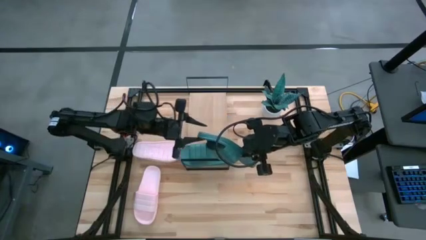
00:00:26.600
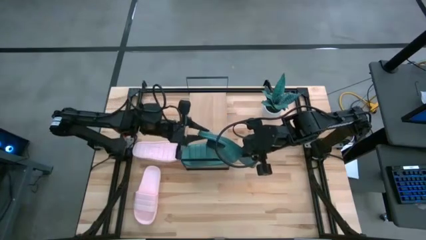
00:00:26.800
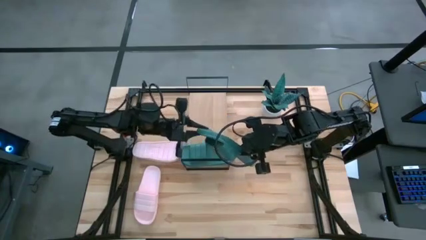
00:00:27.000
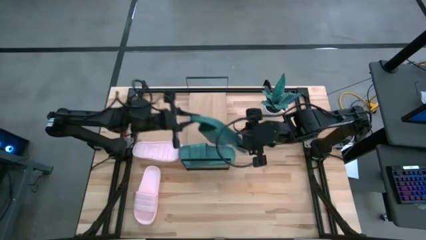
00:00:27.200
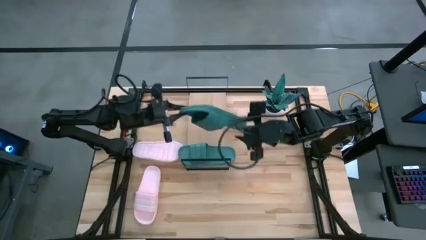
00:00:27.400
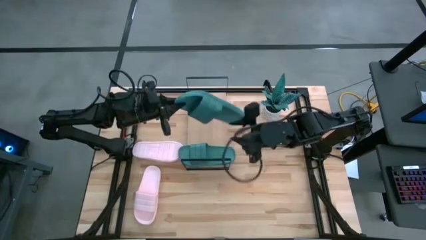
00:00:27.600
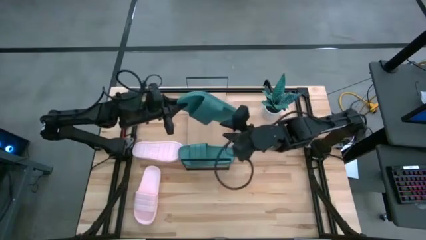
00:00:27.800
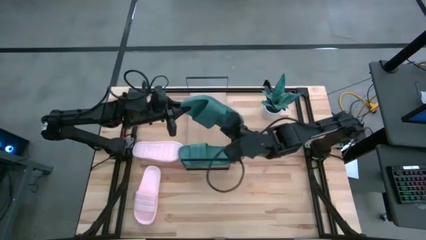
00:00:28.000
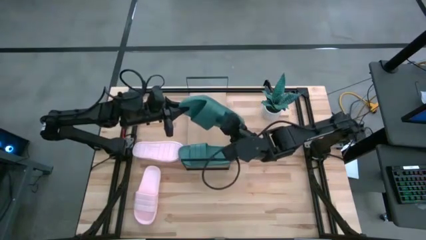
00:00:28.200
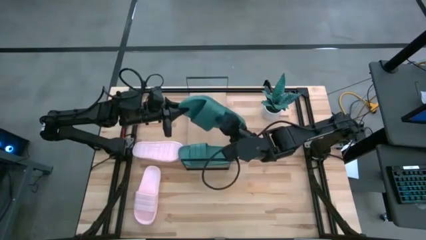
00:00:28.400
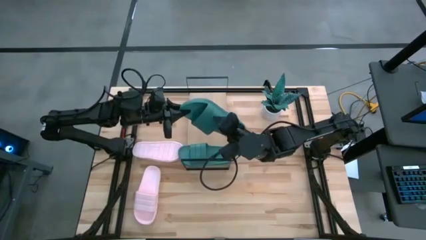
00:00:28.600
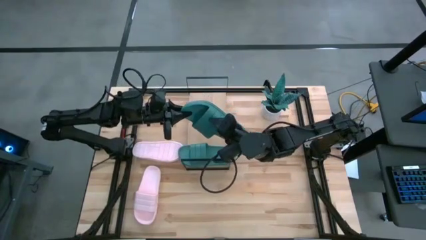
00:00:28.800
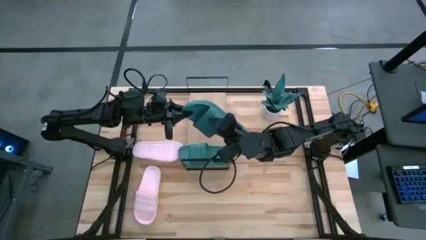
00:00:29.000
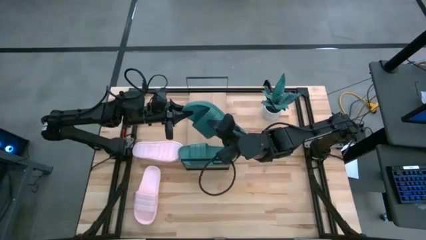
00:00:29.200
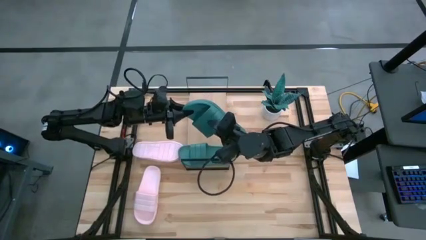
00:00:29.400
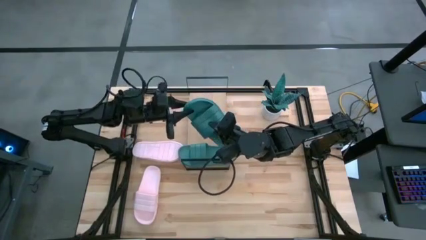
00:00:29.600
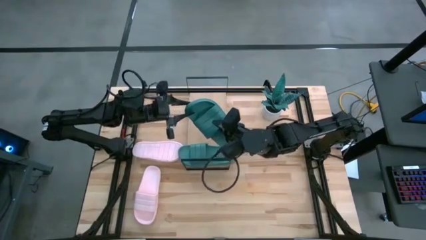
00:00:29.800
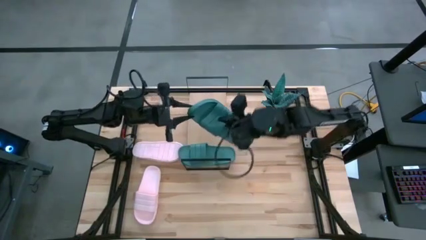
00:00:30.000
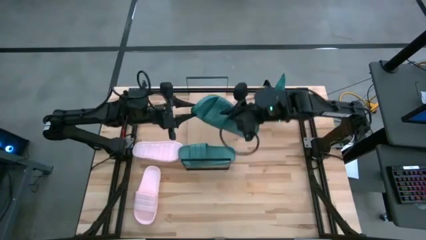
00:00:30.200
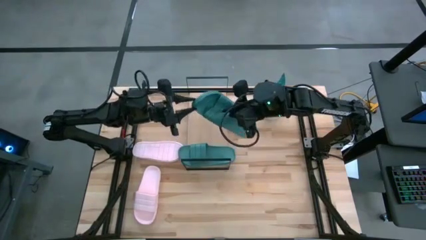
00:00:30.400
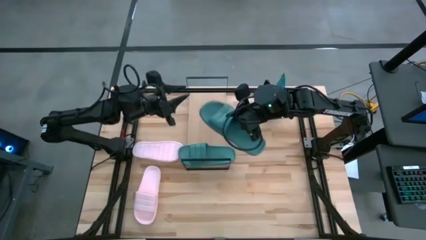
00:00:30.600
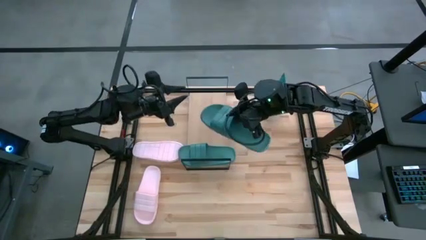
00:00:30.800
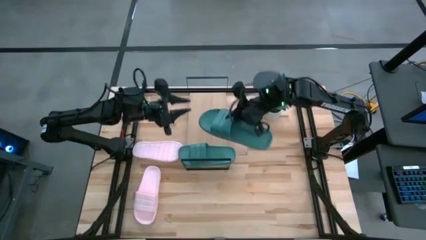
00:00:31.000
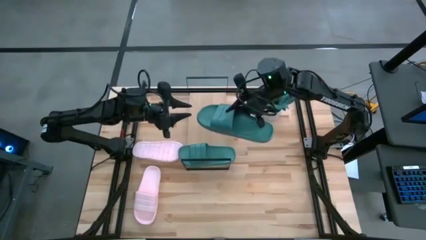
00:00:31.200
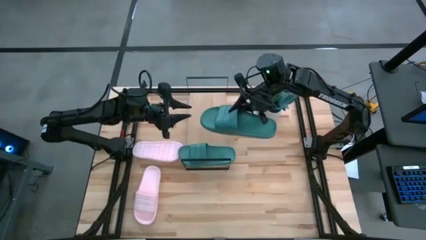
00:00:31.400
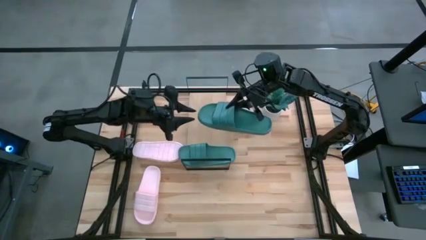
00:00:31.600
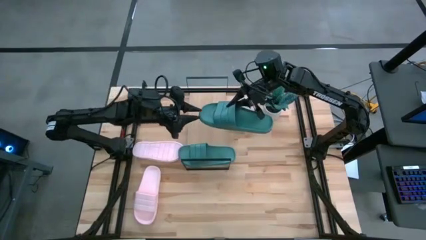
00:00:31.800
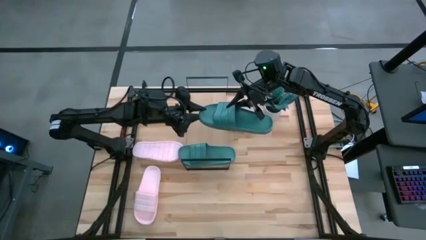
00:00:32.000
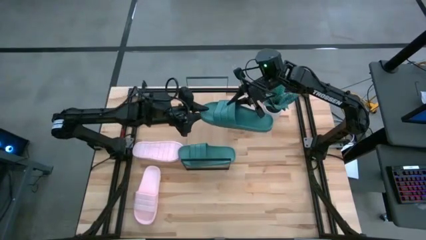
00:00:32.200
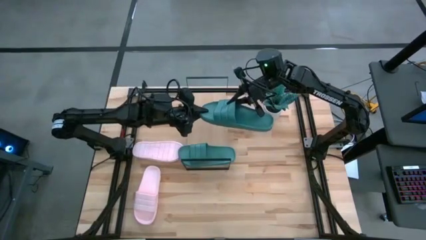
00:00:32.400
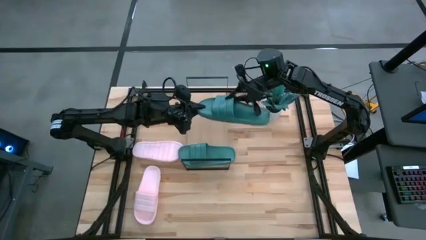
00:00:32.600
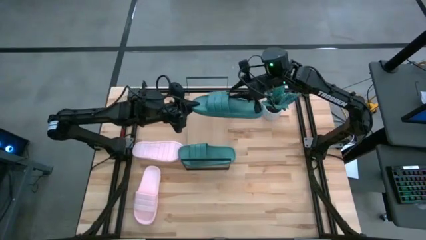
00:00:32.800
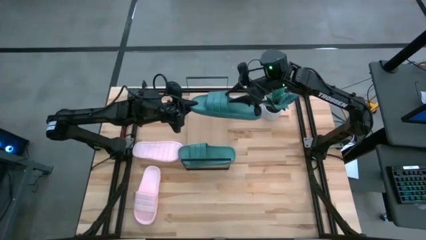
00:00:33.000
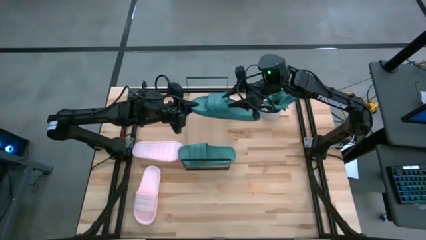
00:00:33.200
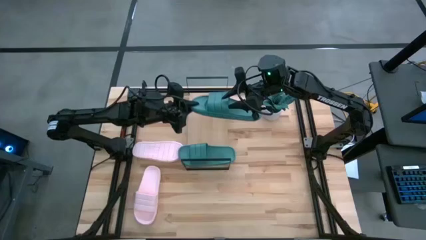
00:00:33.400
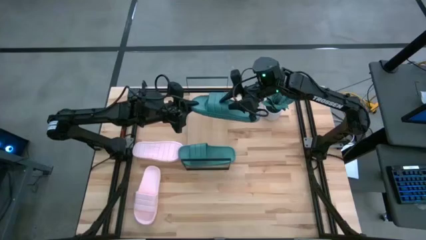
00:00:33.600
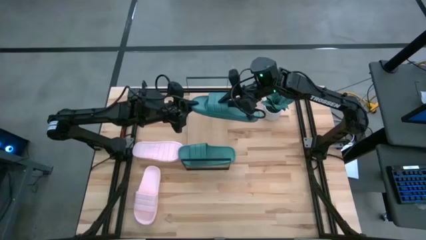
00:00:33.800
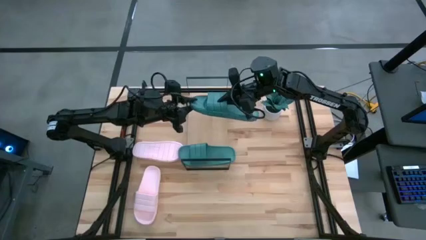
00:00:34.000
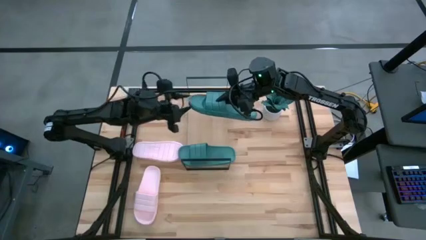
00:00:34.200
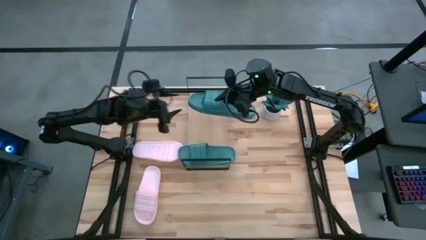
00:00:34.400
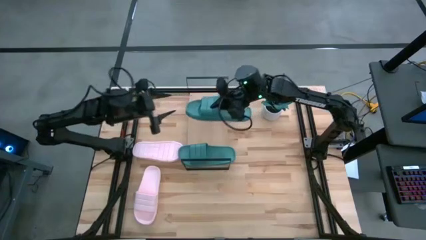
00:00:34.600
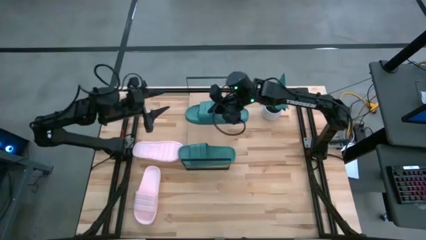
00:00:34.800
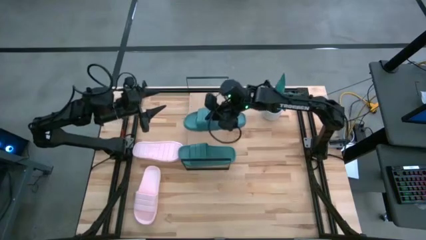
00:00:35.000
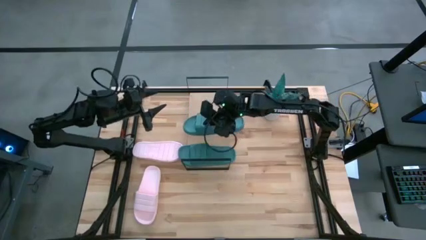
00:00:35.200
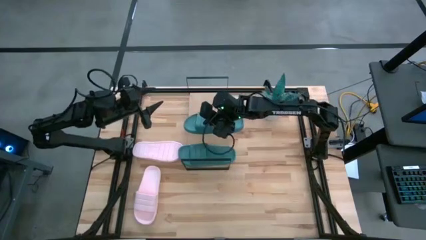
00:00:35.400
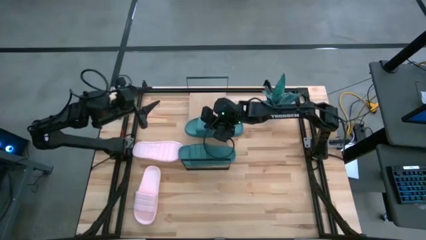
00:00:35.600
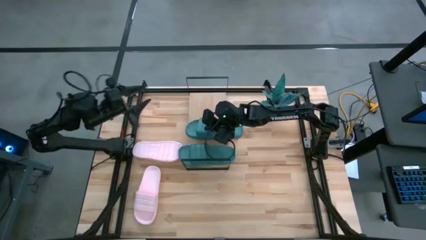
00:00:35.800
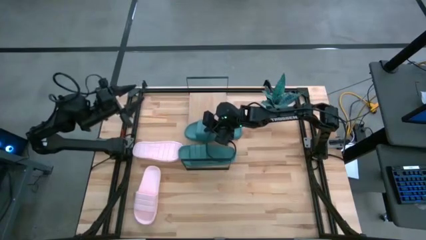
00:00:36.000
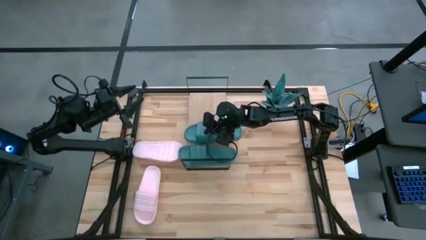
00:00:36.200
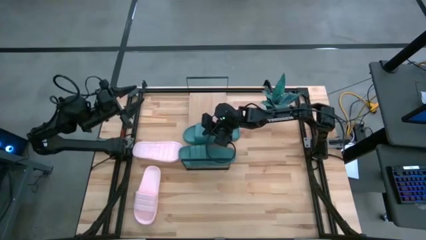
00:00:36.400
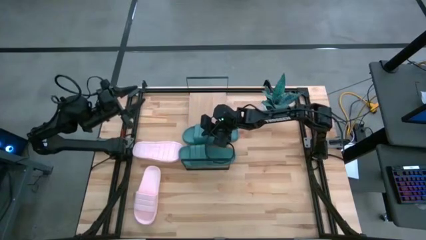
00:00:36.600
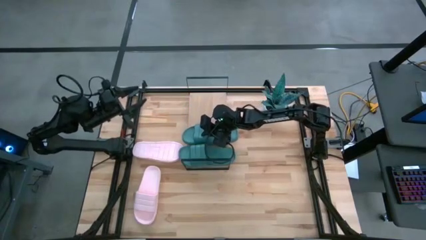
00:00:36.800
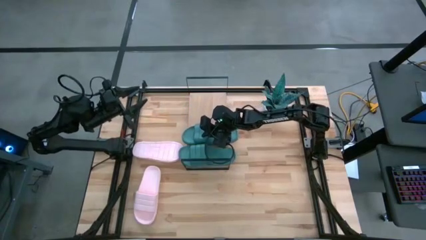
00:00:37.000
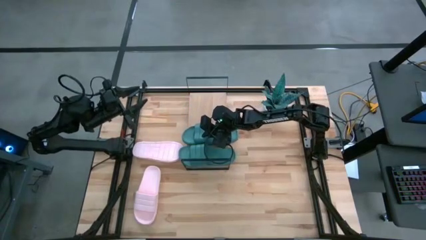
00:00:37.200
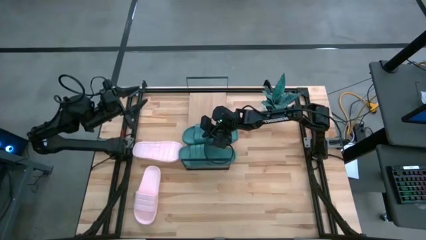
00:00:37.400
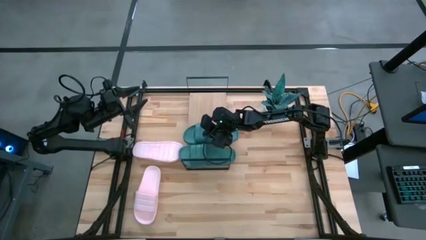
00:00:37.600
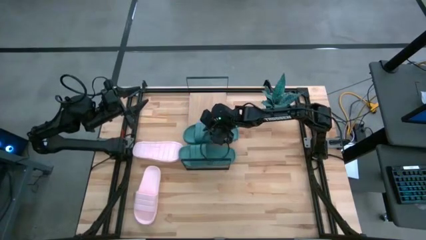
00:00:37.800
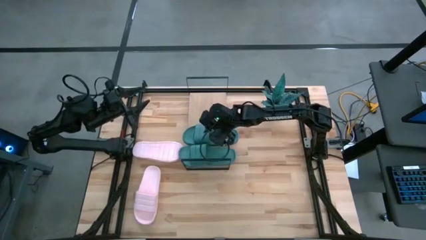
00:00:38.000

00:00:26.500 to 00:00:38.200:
Task: Pick and place slides into the shelf
Put the green slipper on the shelf

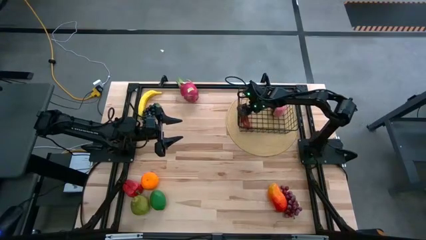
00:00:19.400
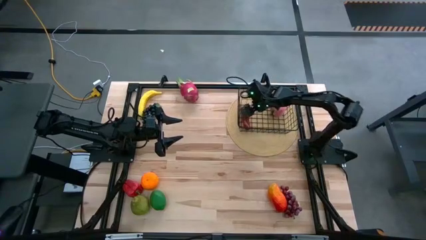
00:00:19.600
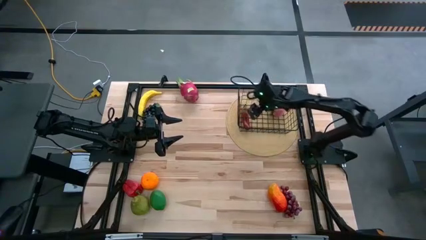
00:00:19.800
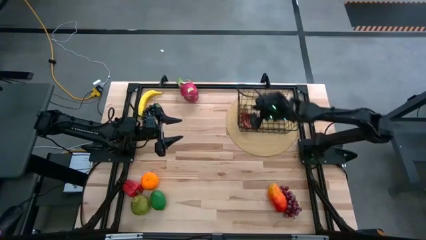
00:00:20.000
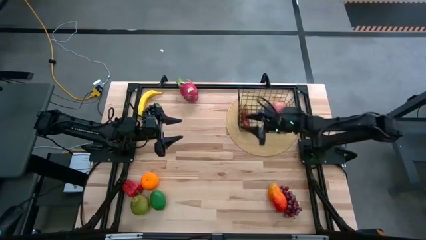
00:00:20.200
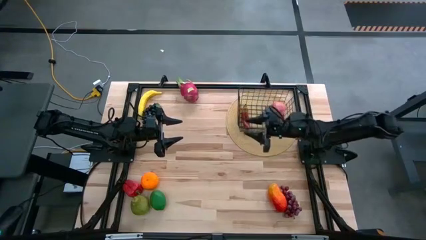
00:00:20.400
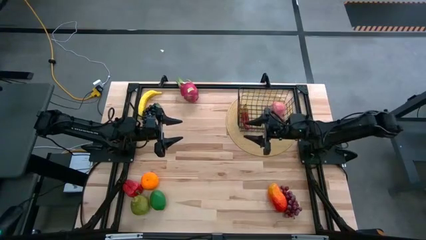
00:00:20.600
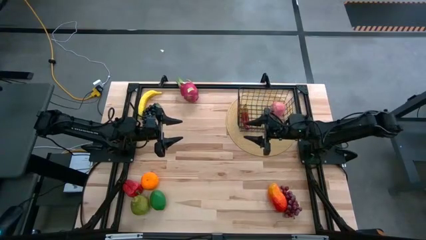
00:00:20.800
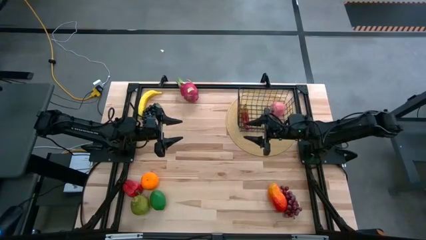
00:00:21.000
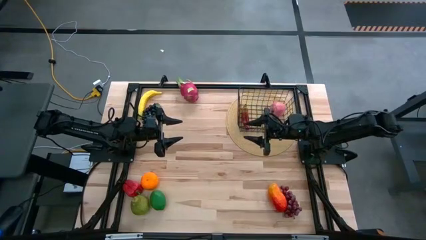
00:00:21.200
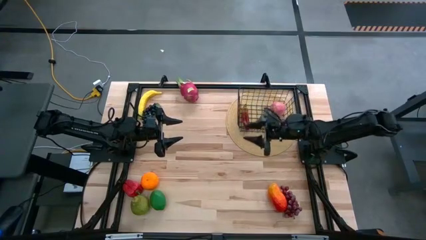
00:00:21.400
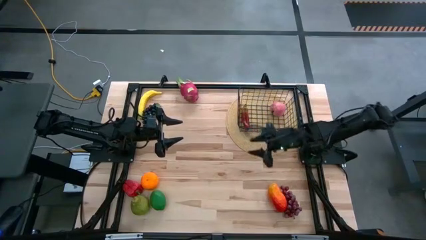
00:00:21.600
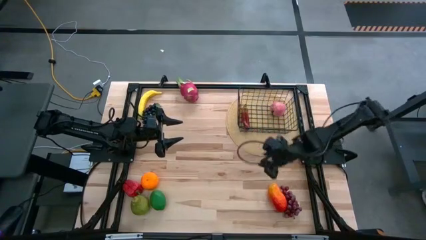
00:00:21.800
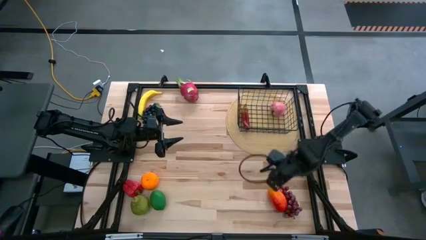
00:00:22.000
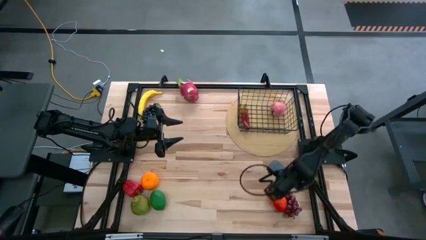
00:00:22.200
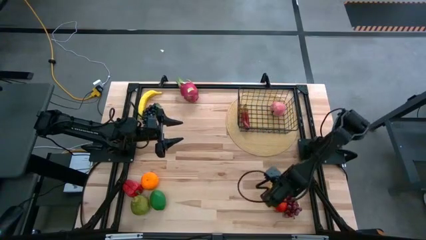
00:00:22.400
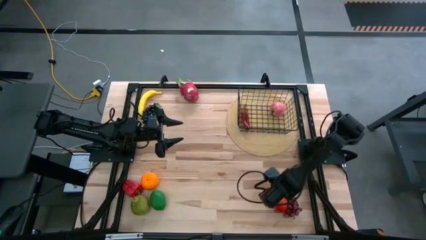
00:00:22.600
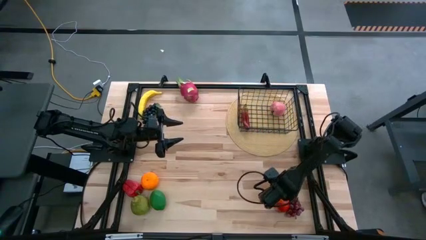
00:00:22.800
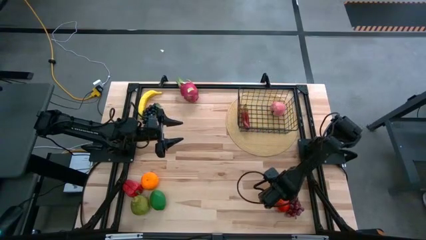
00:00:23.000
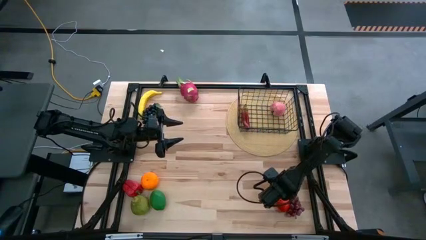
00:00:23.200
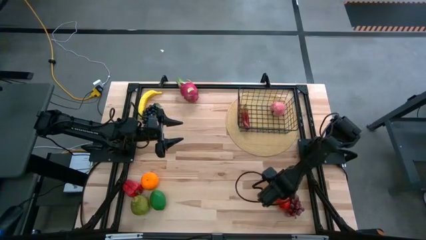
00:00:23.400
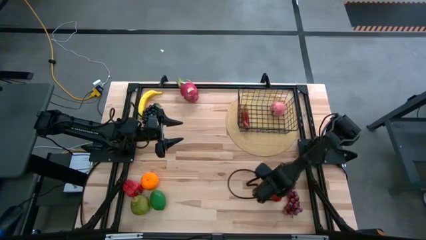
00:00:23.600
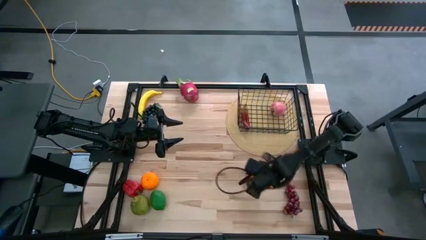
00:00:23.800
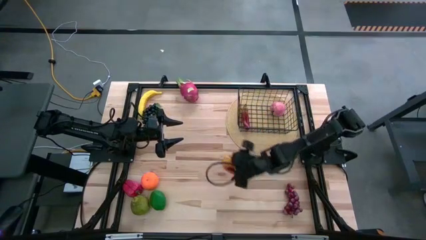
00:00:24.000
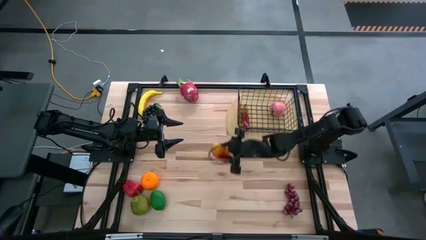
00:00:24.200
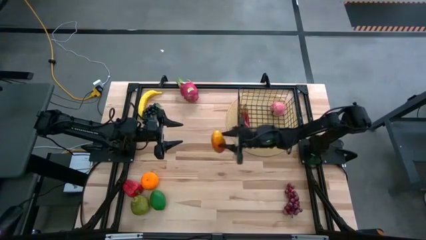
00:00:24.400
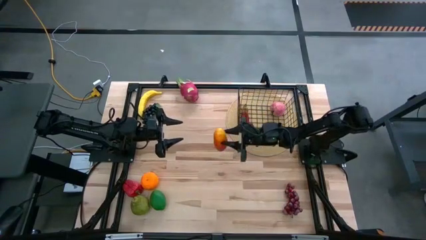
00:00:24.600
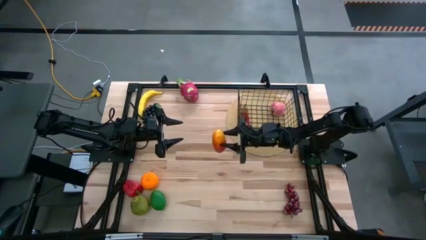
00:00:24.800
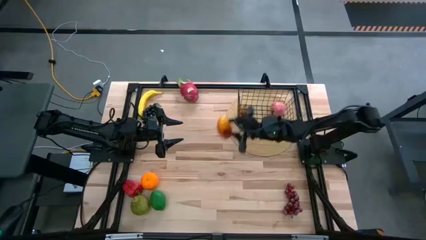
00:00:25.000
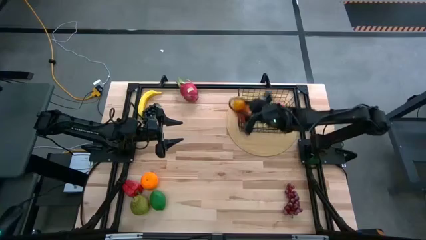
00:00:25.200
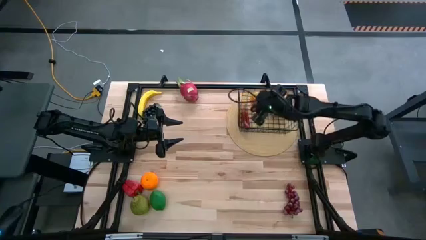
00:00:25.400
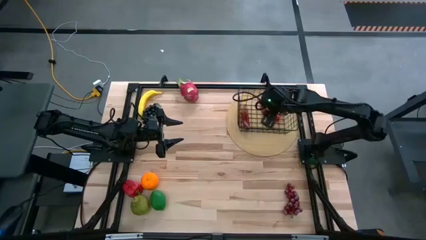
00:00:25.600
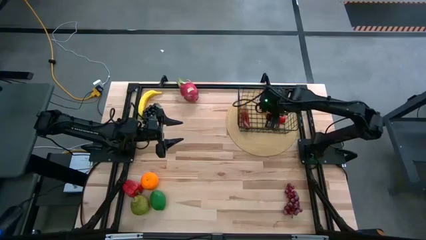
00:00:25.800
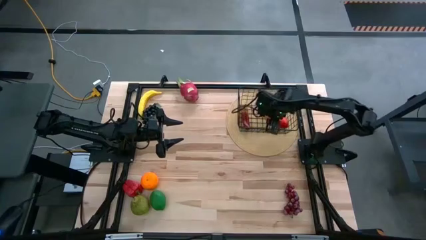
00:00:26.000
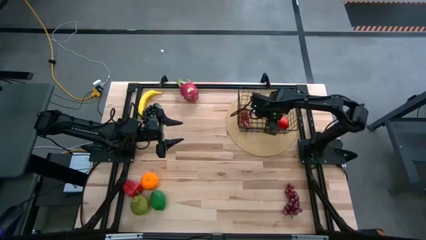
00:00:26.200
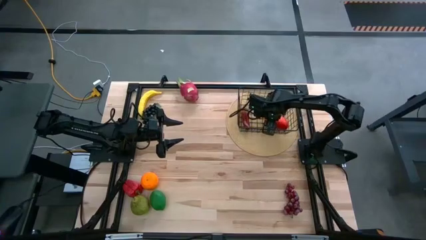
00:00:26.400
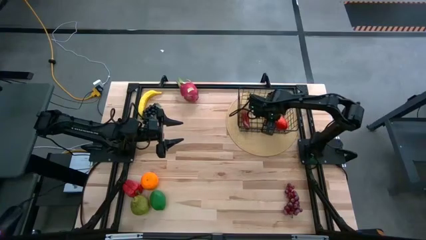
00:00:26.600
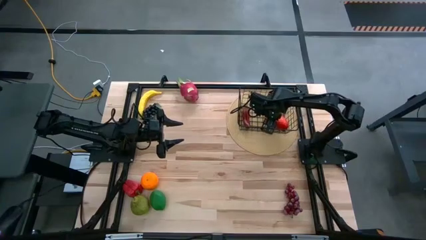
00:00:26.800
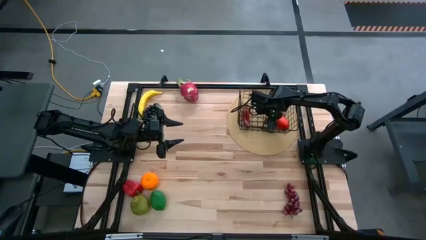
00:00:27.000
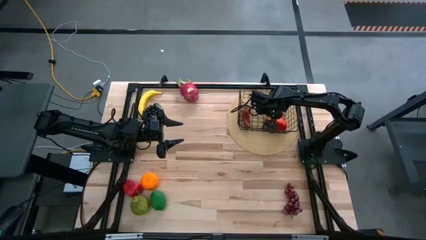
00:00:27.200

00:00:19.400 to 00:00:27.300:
Task: Build produce basket
Put the mango into the wire basket
